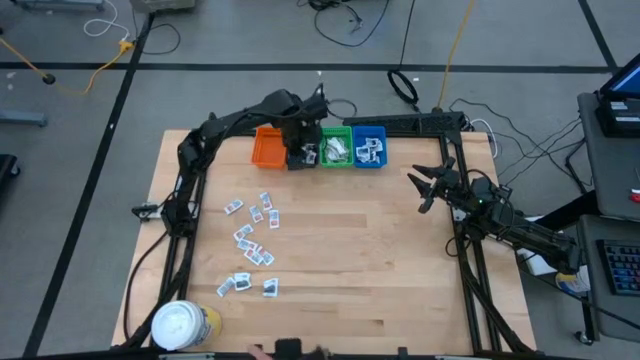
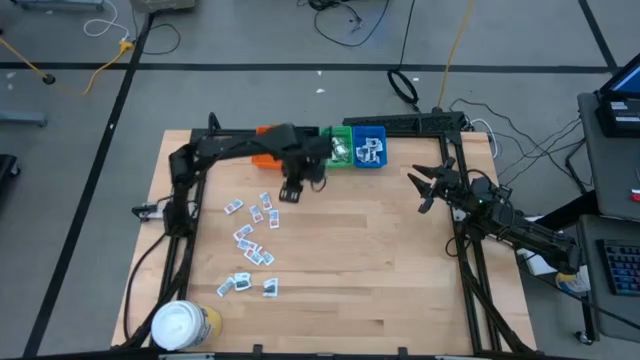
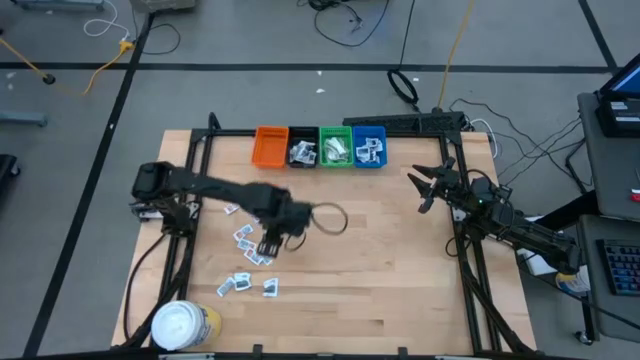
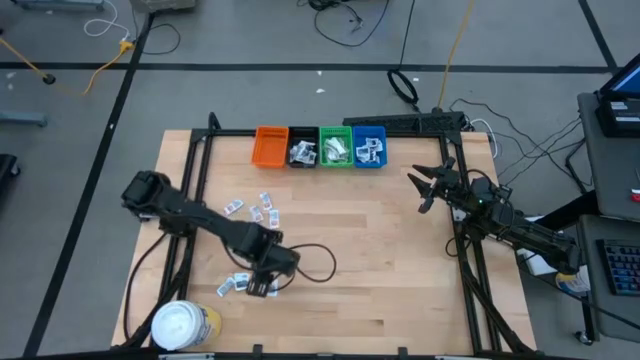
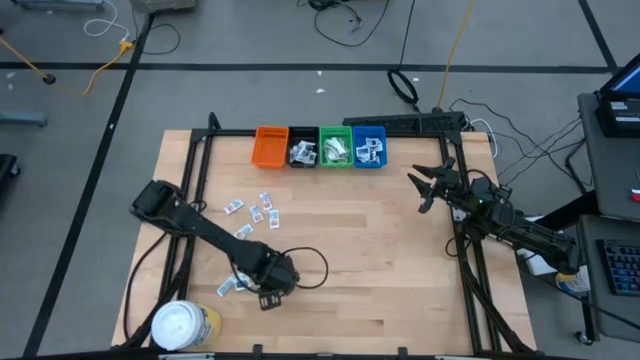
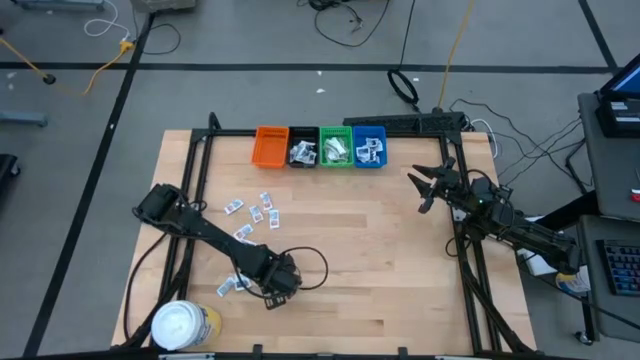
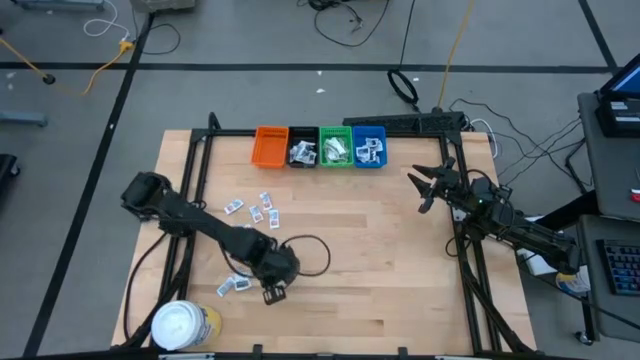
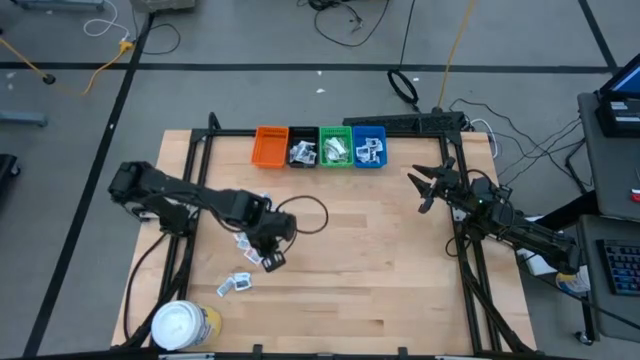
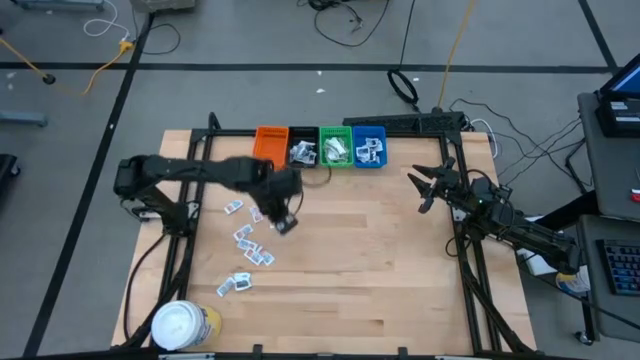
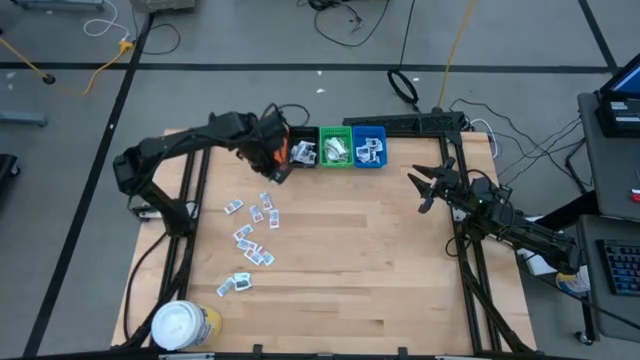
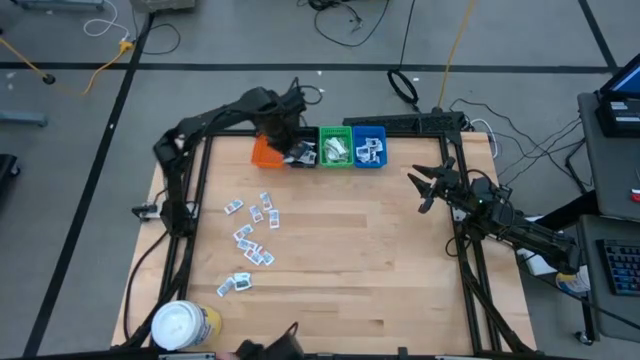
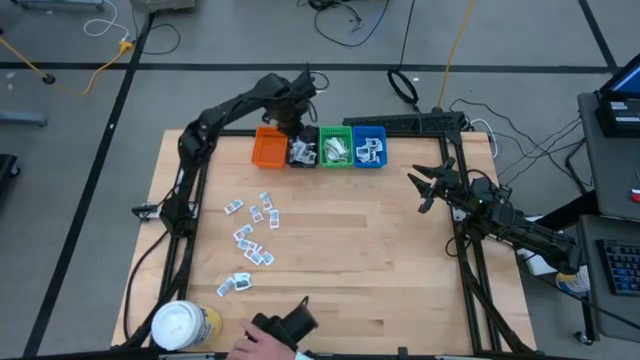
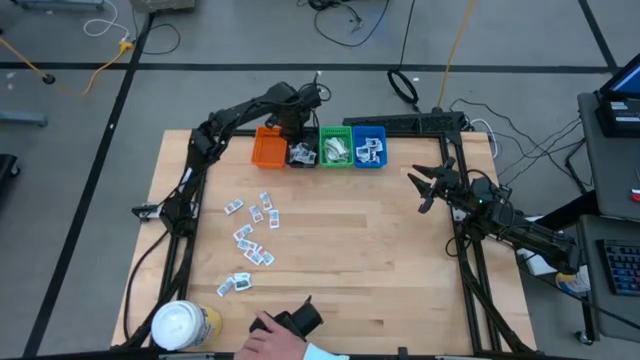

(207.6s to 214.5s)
Task: Pick & Place First Aid Supplies
Put the blue packet into the black bin

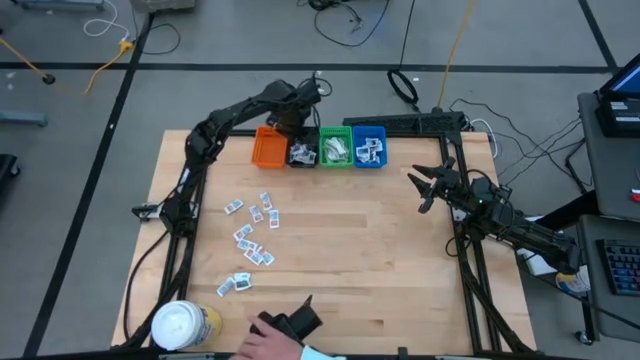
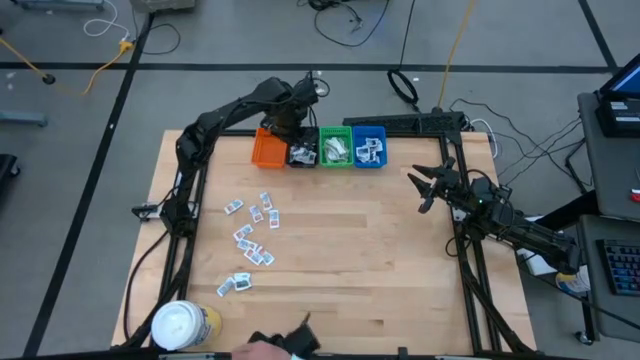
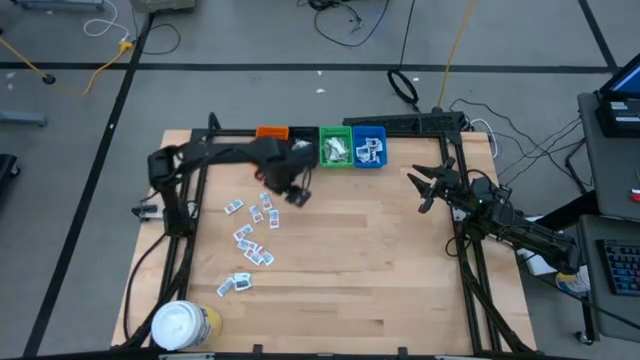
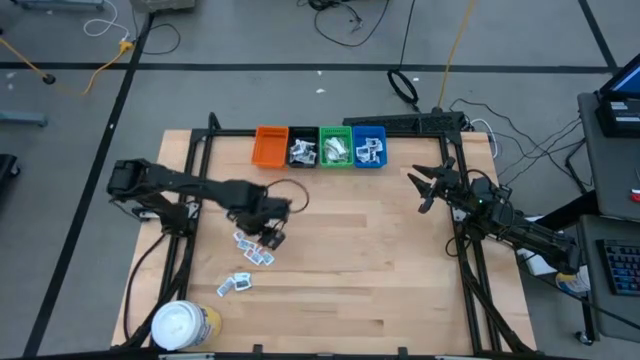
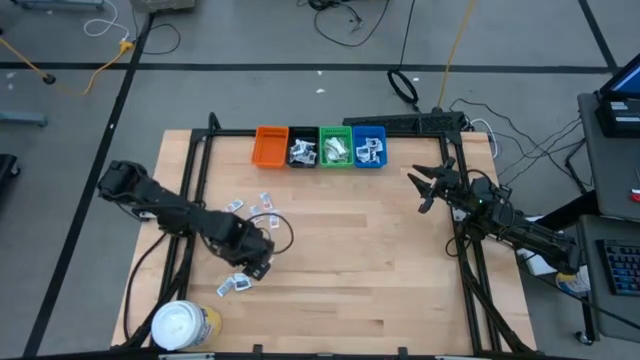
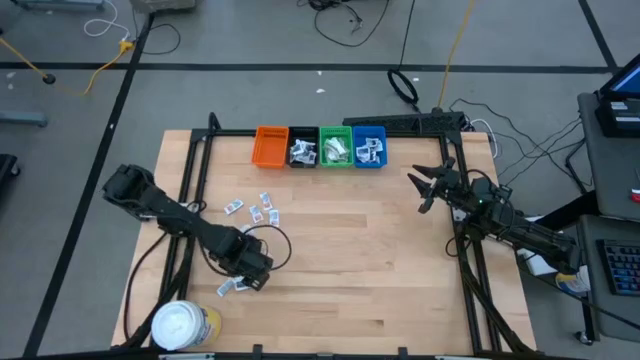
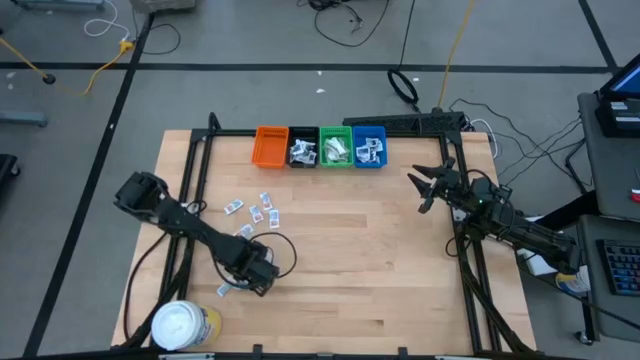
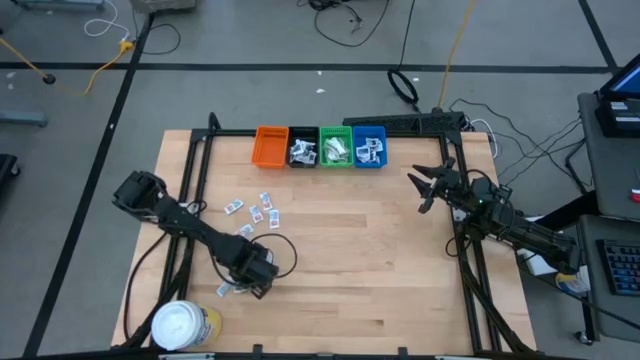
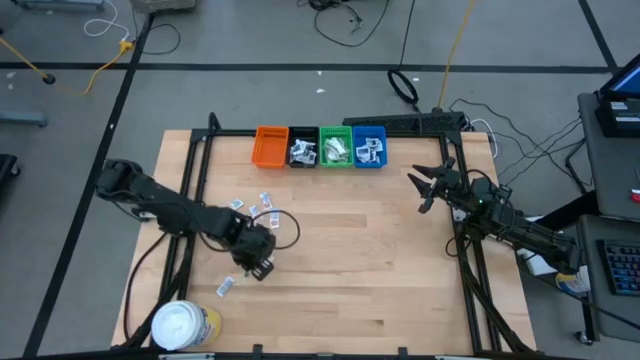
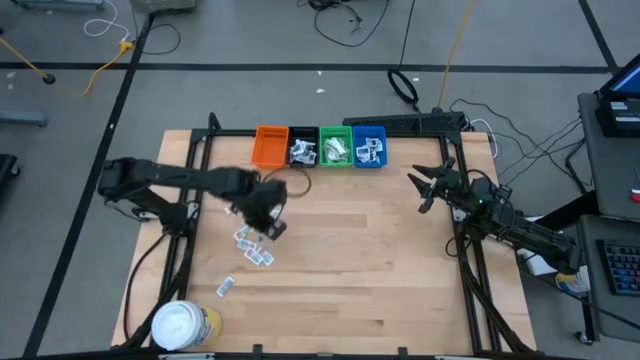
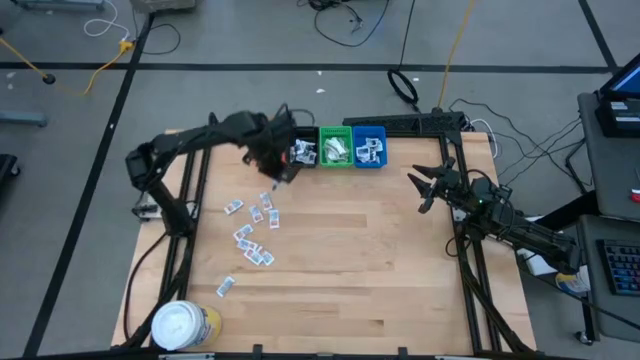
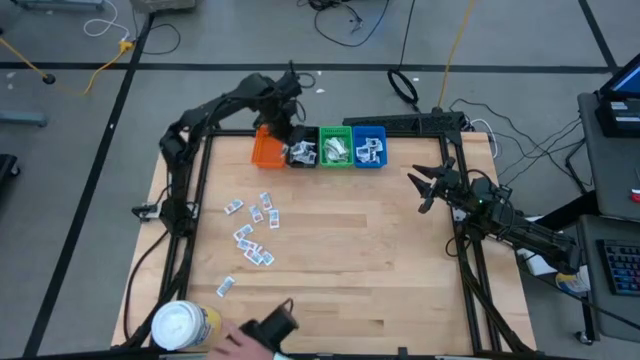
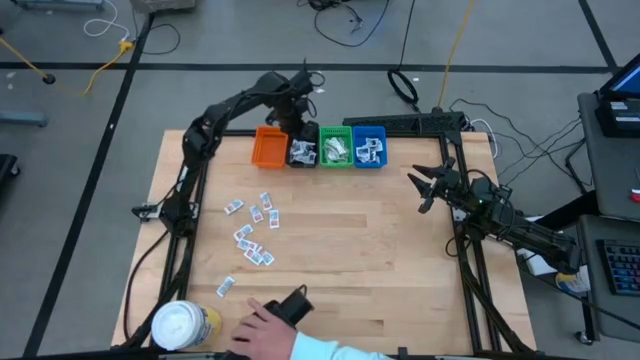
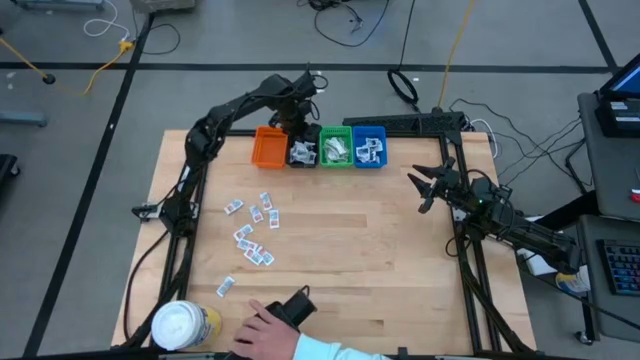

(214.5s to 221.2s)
Put the blue packet into the black bin

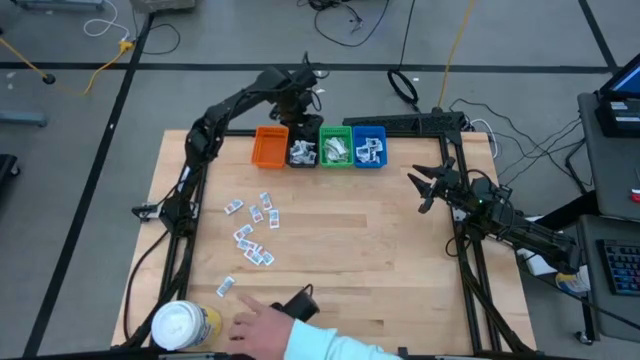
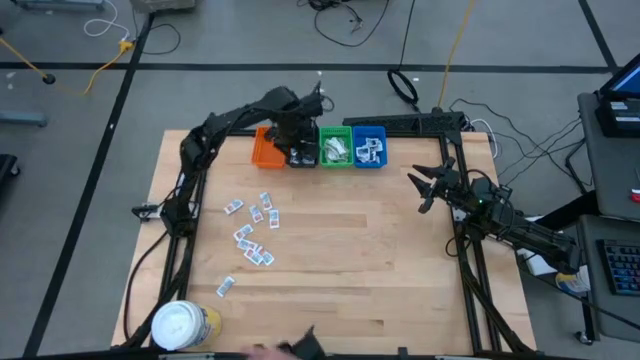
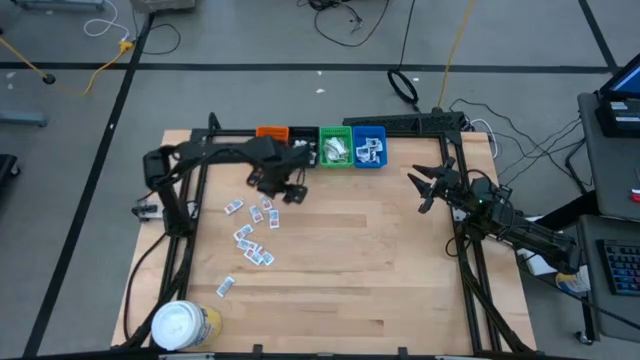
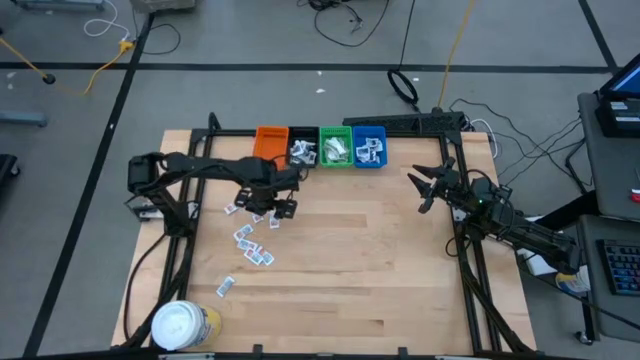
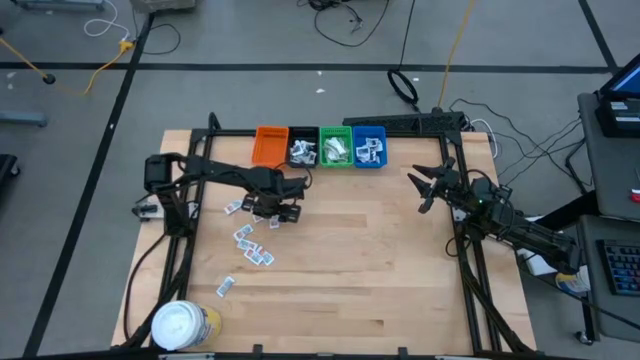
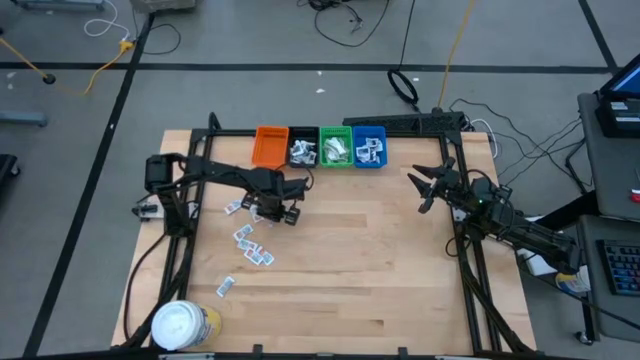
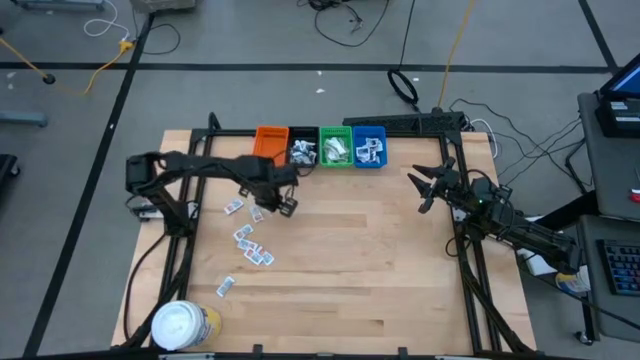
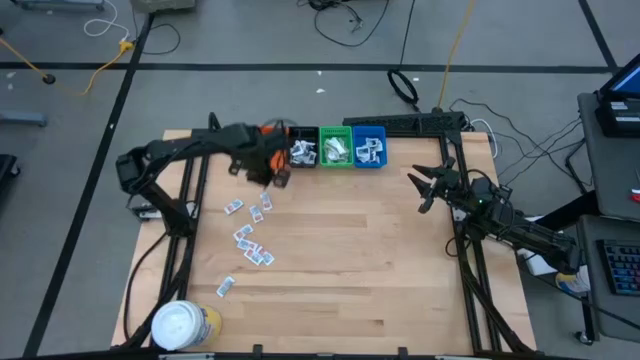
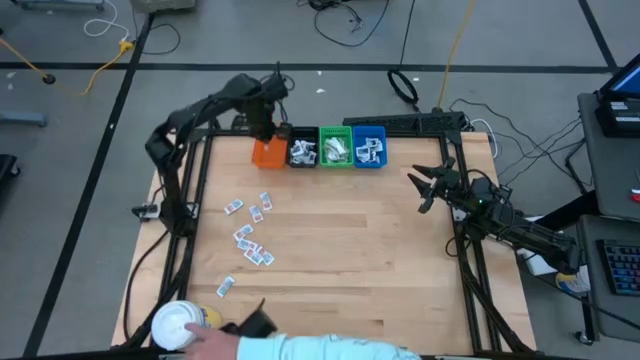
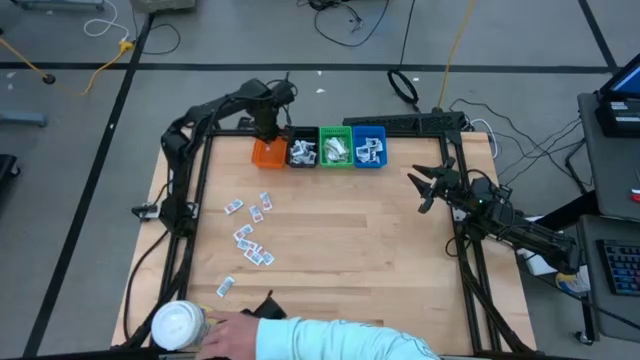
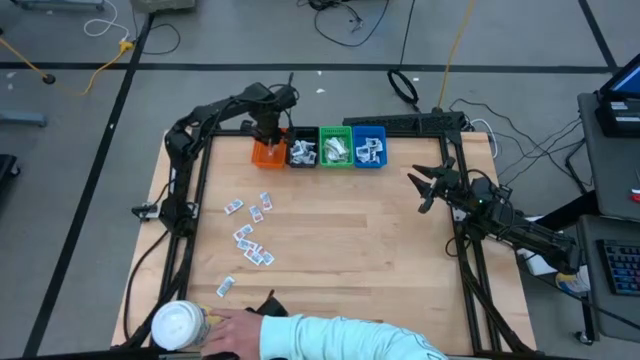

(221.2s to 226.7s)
Put the red packet into the orange bin

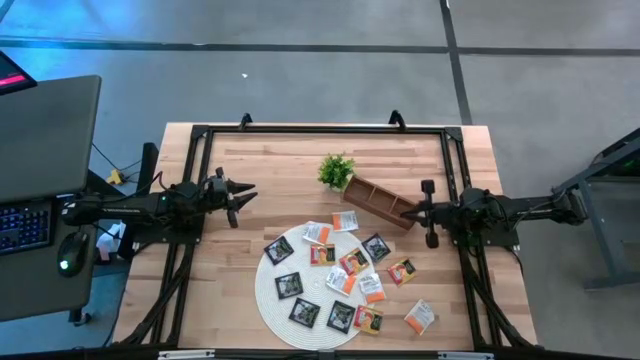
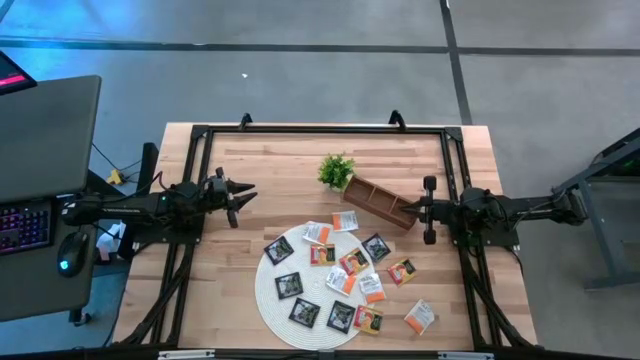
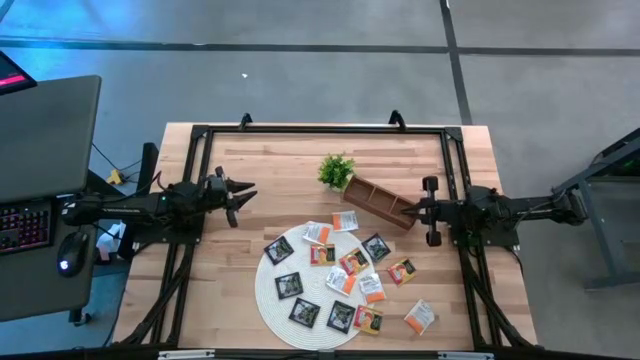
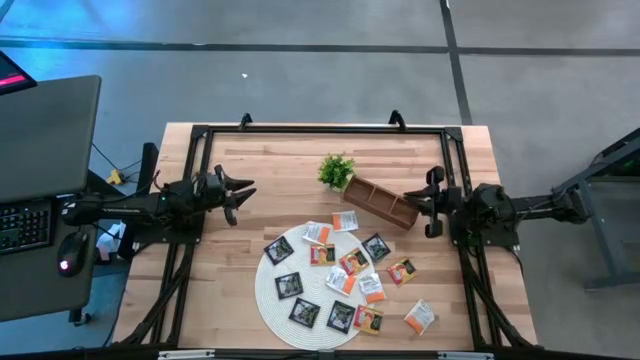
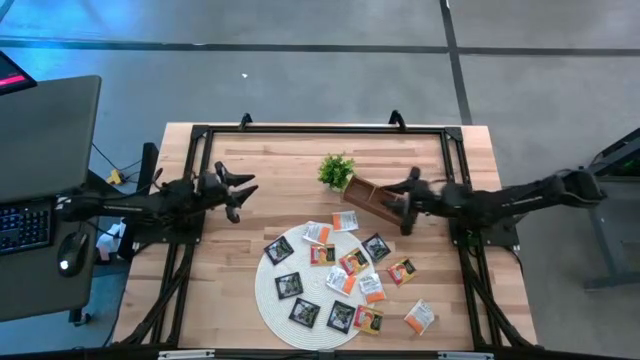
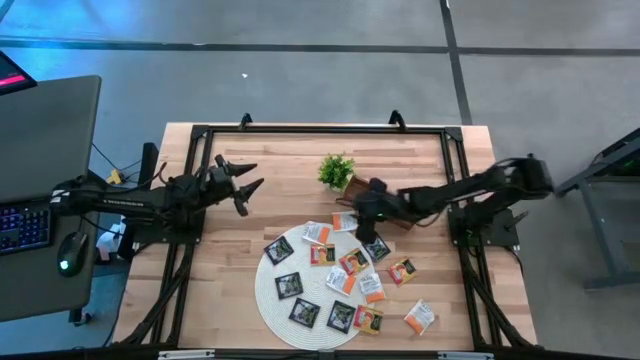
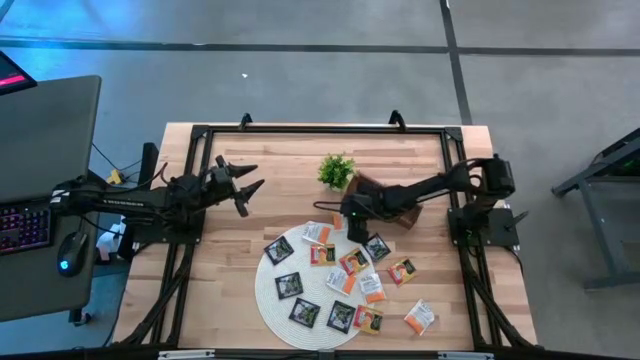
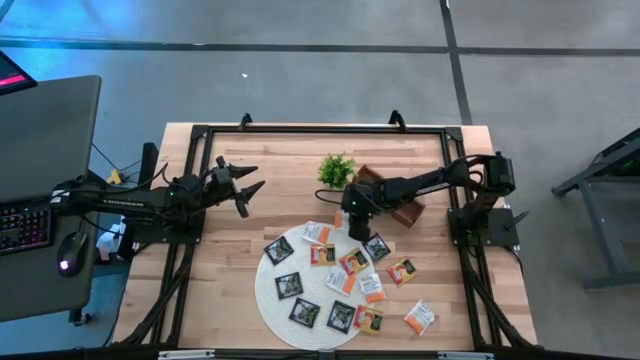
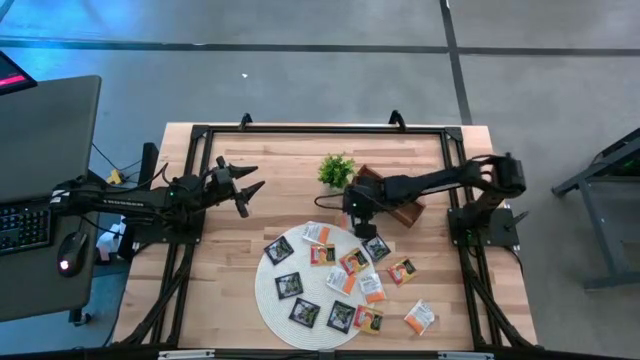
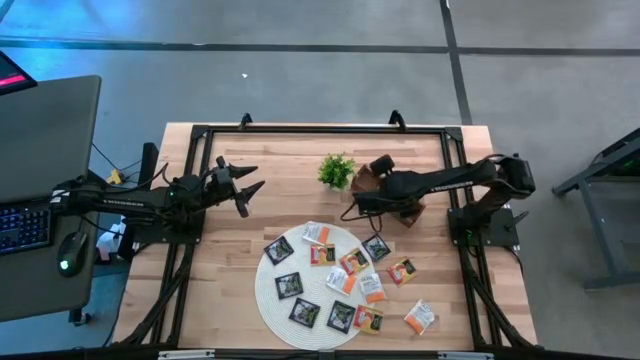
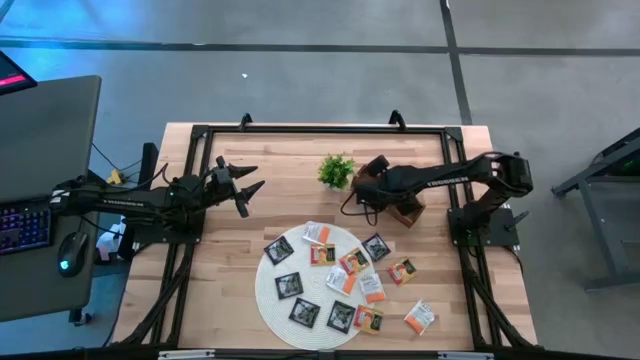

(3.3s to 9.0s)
Task: Pick & Place Tea
Put the white tea bag into the middle section of the wooden organizer
